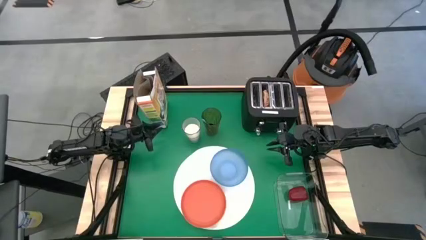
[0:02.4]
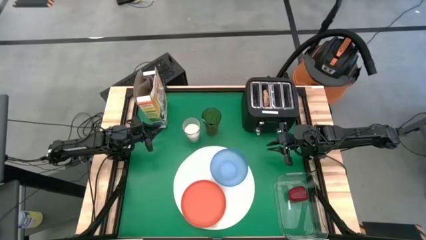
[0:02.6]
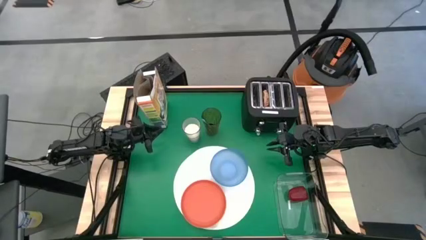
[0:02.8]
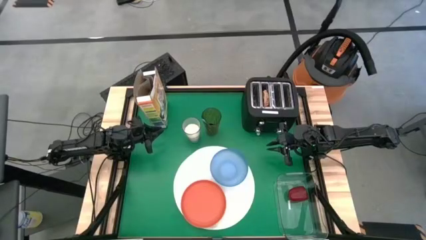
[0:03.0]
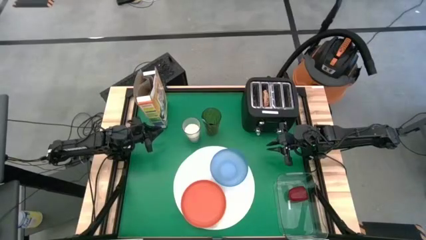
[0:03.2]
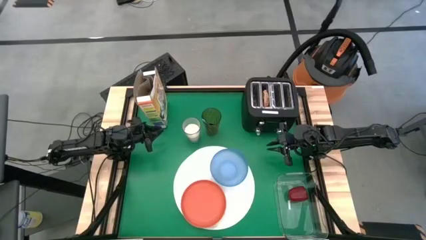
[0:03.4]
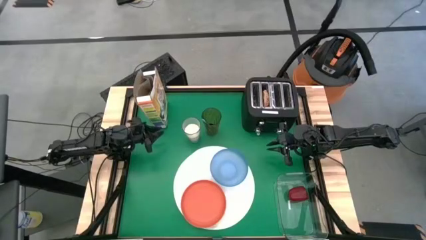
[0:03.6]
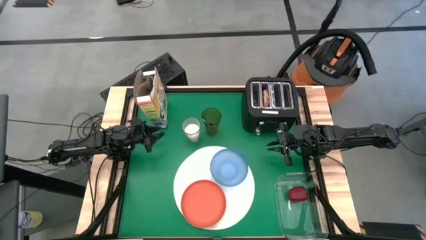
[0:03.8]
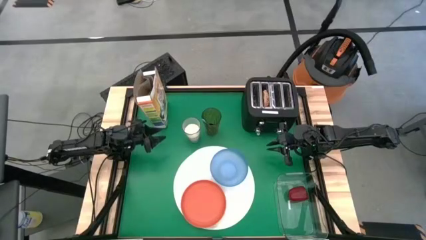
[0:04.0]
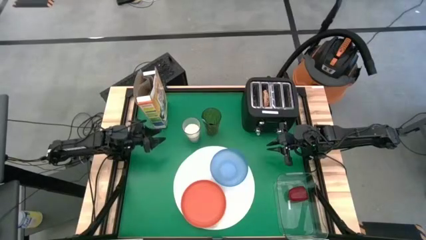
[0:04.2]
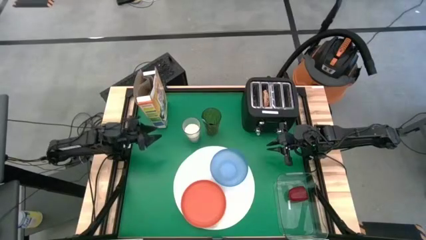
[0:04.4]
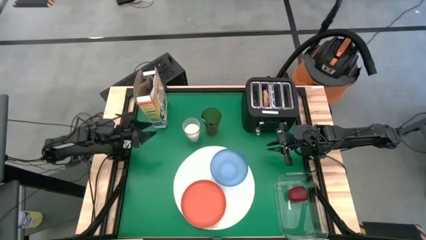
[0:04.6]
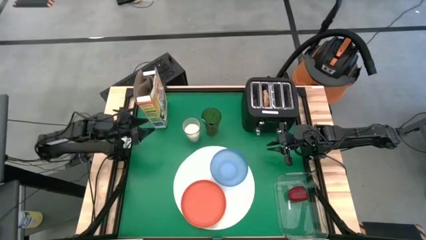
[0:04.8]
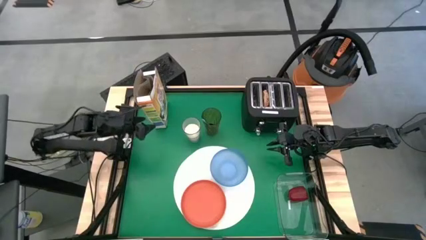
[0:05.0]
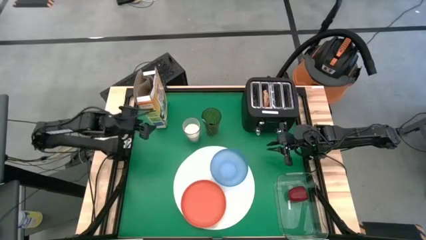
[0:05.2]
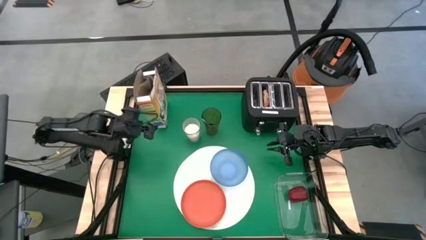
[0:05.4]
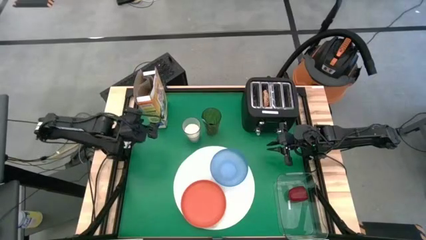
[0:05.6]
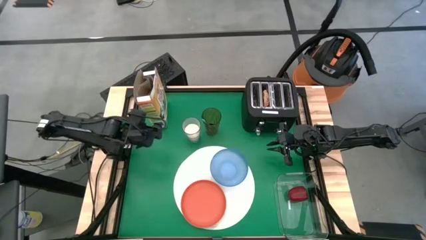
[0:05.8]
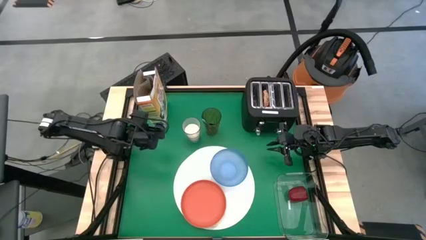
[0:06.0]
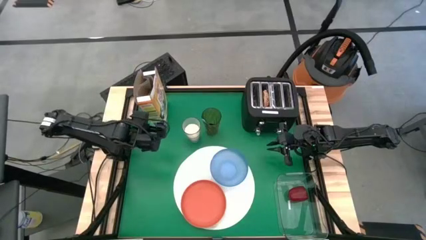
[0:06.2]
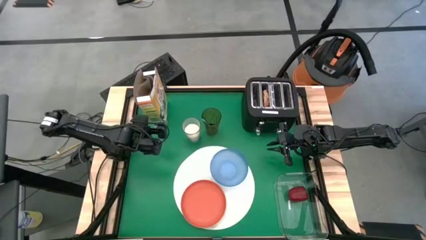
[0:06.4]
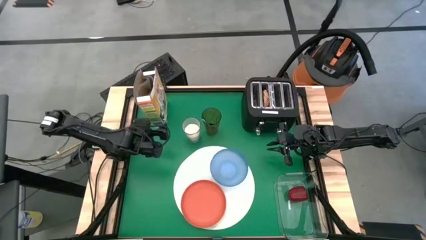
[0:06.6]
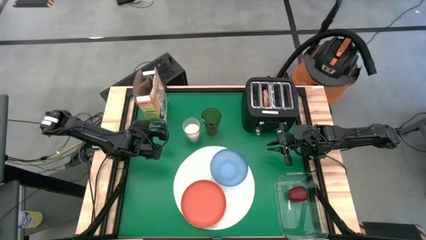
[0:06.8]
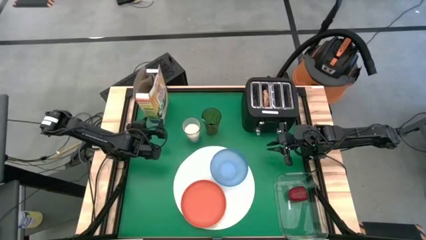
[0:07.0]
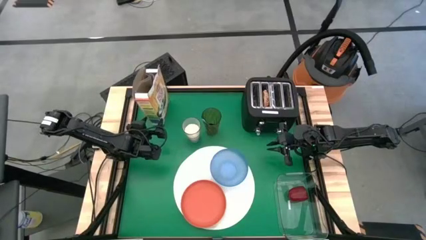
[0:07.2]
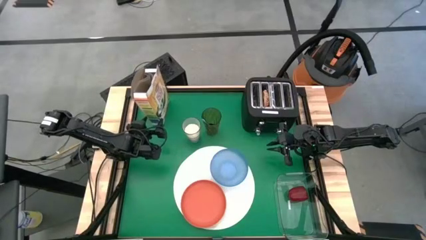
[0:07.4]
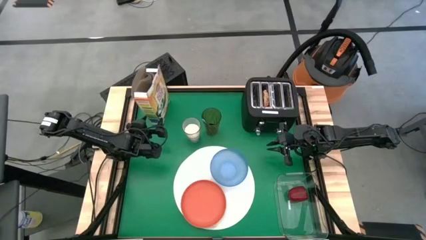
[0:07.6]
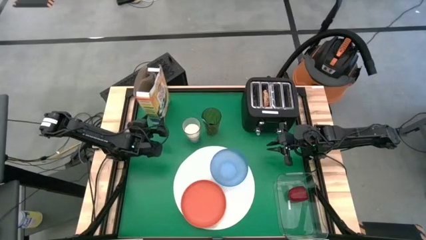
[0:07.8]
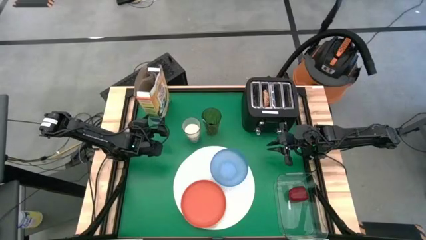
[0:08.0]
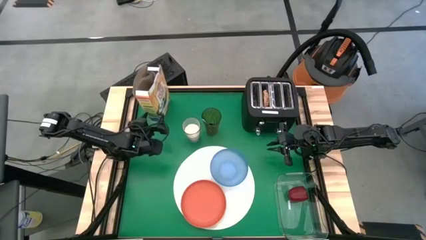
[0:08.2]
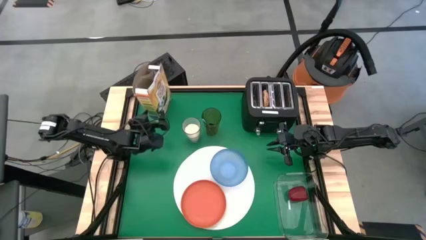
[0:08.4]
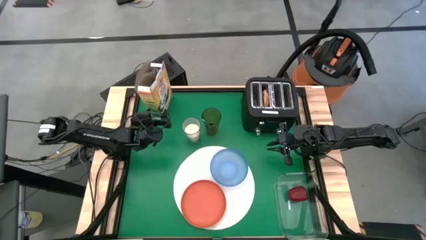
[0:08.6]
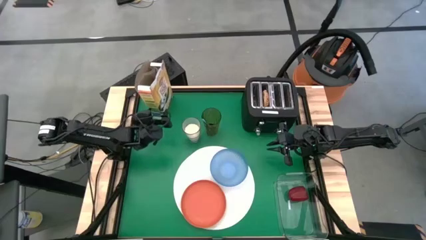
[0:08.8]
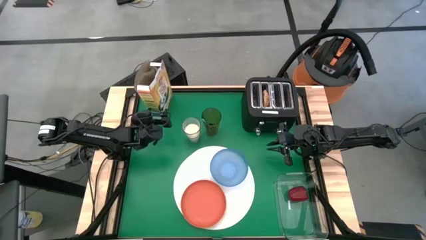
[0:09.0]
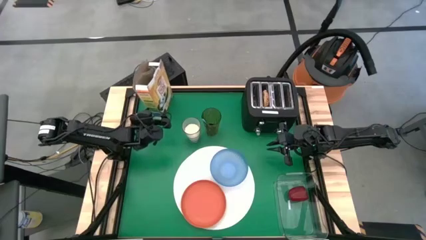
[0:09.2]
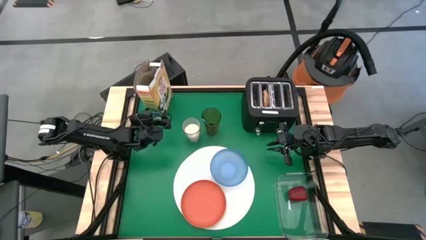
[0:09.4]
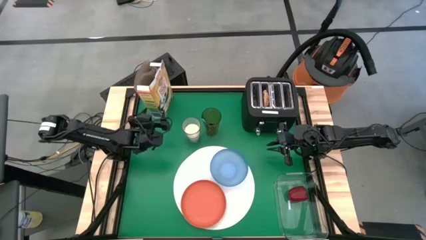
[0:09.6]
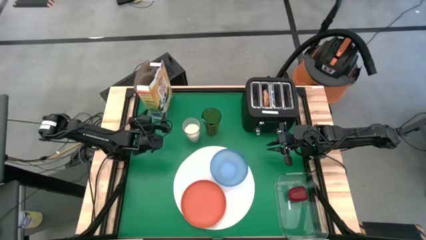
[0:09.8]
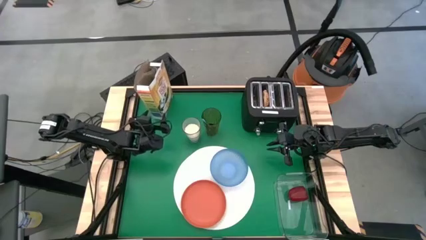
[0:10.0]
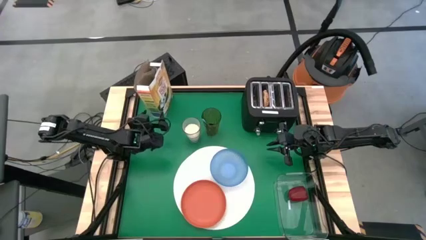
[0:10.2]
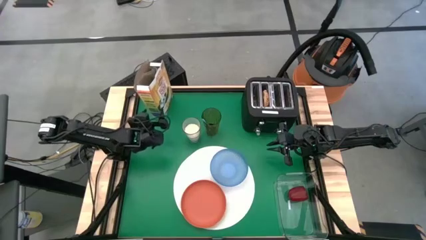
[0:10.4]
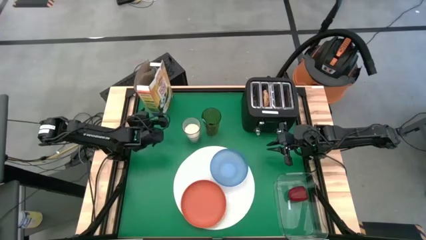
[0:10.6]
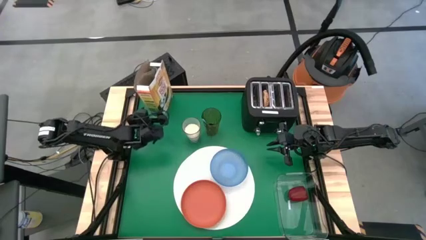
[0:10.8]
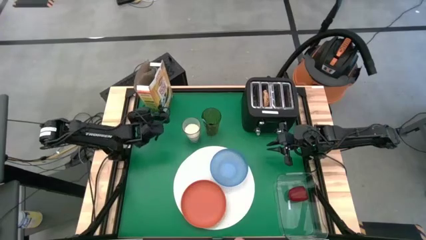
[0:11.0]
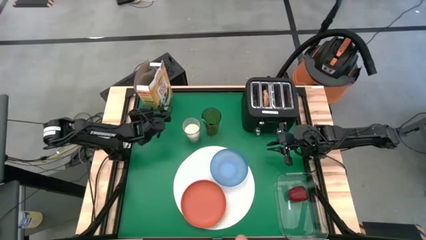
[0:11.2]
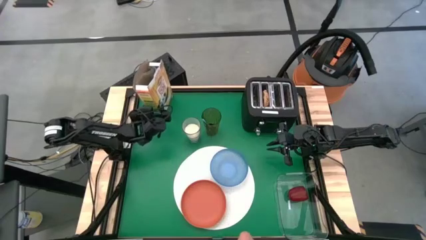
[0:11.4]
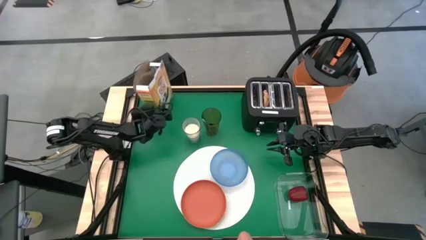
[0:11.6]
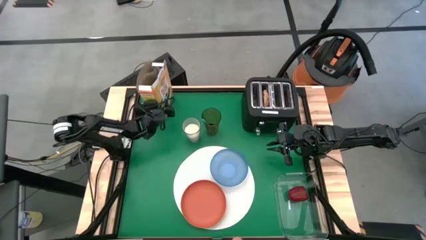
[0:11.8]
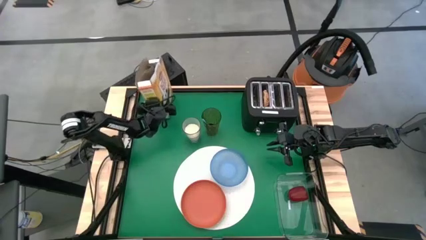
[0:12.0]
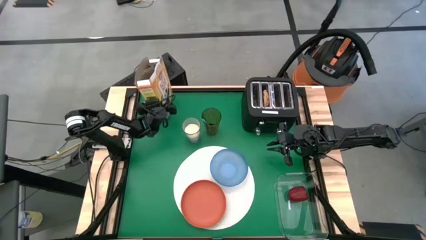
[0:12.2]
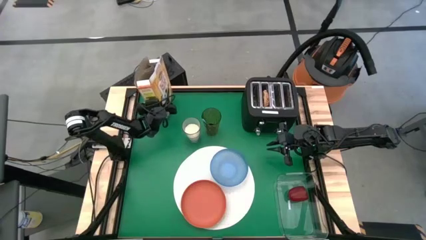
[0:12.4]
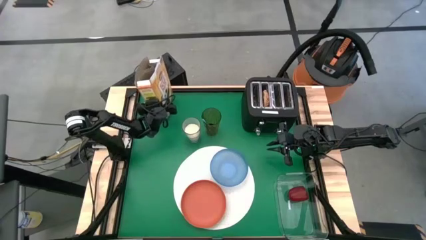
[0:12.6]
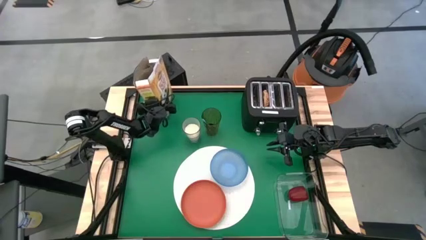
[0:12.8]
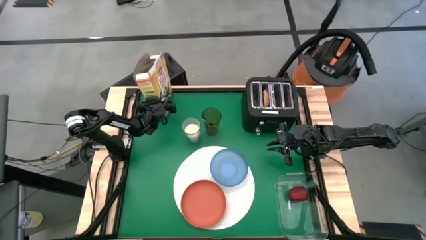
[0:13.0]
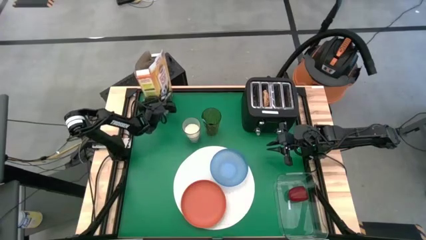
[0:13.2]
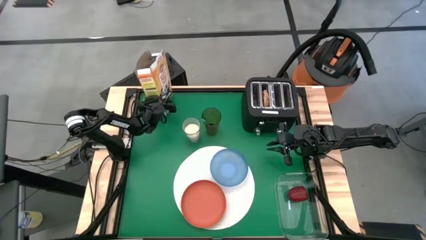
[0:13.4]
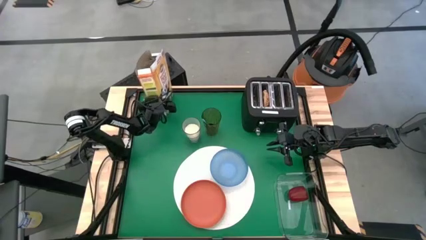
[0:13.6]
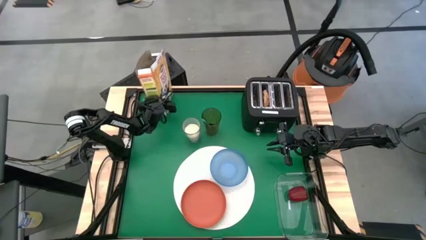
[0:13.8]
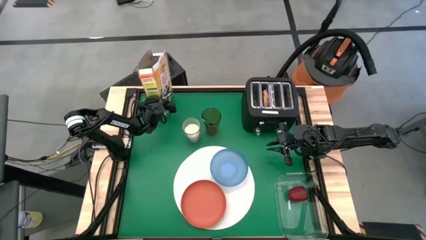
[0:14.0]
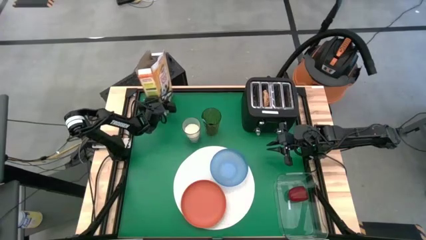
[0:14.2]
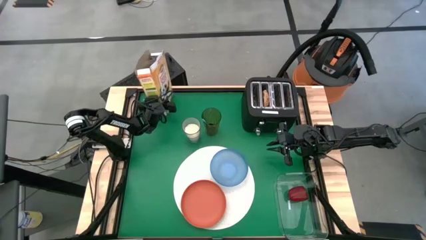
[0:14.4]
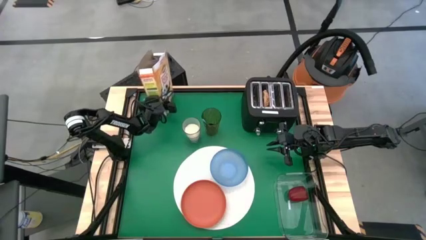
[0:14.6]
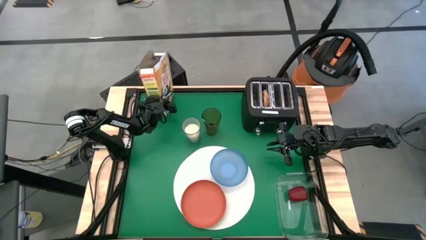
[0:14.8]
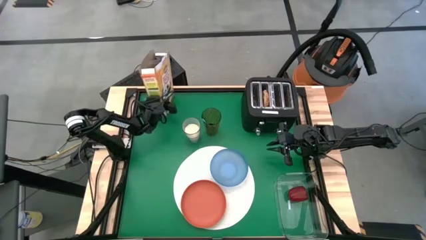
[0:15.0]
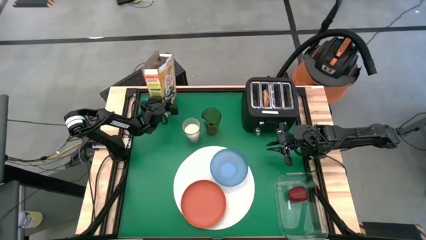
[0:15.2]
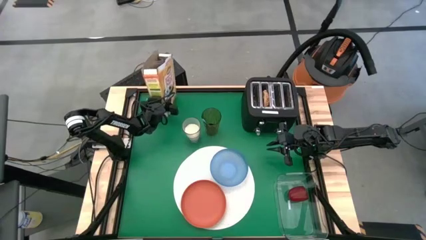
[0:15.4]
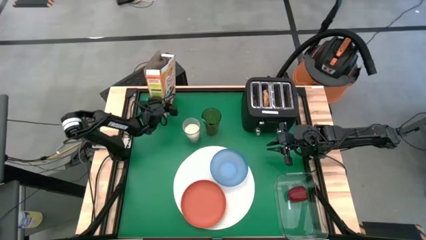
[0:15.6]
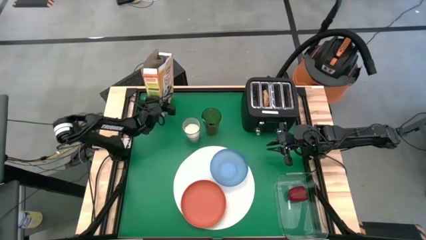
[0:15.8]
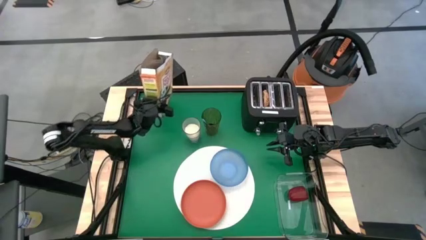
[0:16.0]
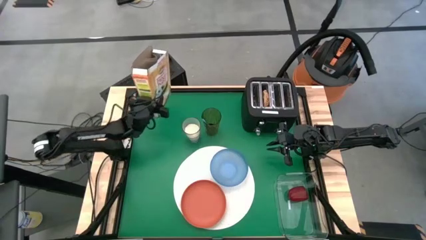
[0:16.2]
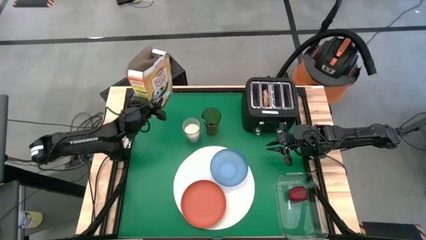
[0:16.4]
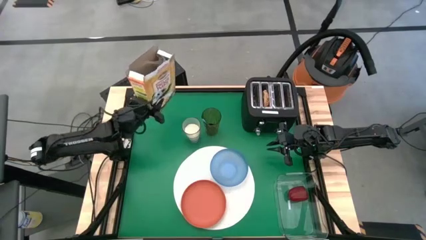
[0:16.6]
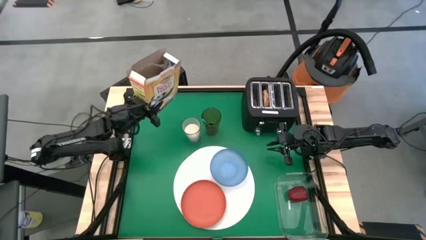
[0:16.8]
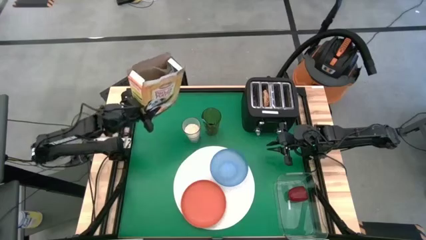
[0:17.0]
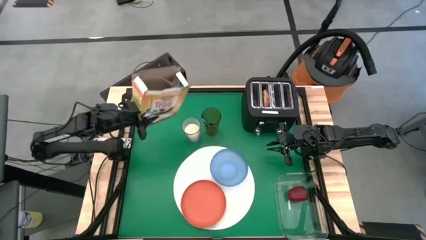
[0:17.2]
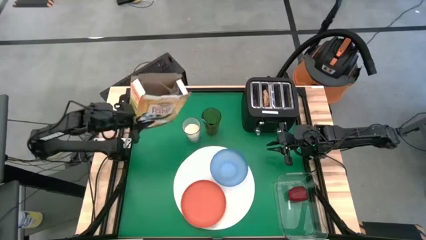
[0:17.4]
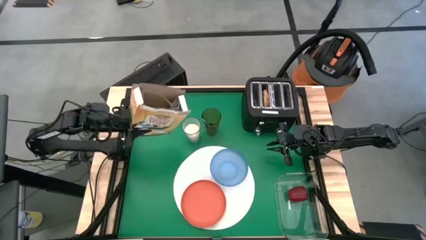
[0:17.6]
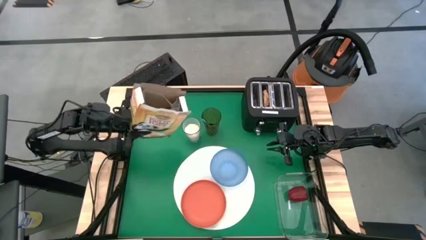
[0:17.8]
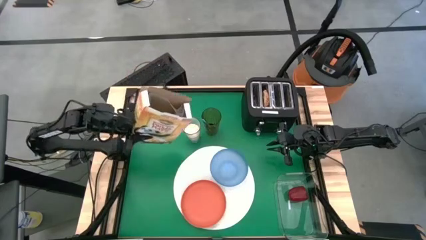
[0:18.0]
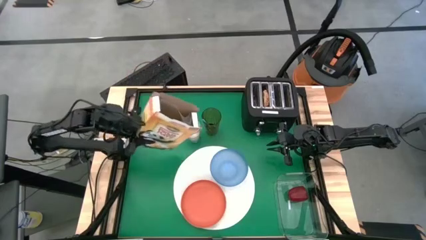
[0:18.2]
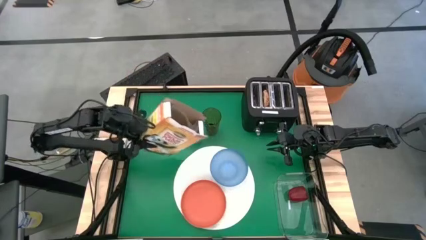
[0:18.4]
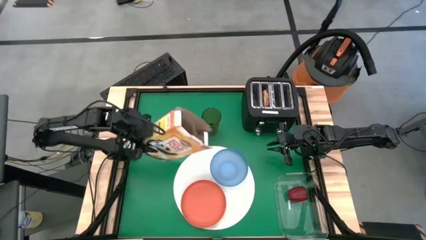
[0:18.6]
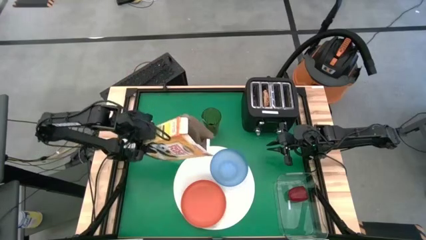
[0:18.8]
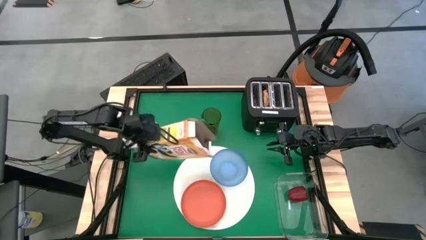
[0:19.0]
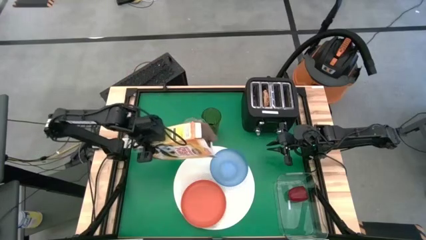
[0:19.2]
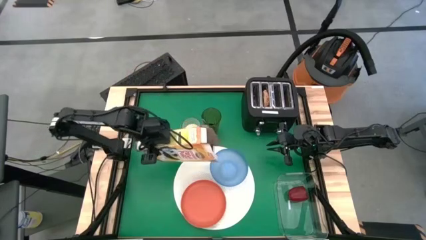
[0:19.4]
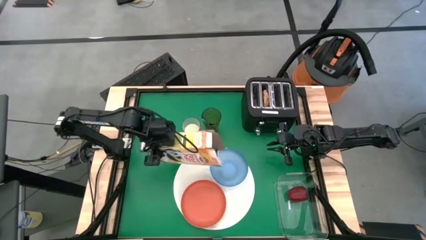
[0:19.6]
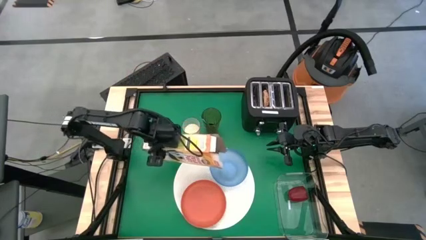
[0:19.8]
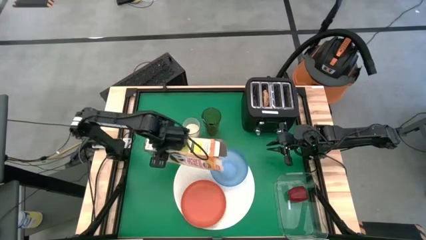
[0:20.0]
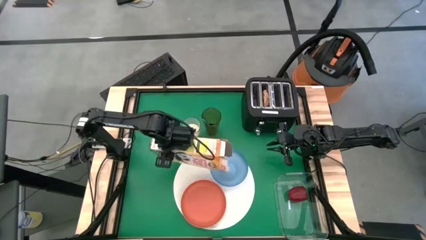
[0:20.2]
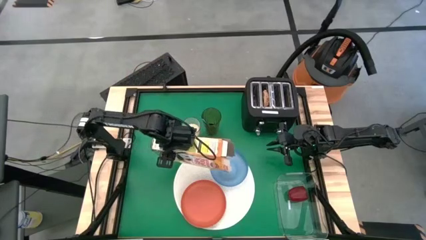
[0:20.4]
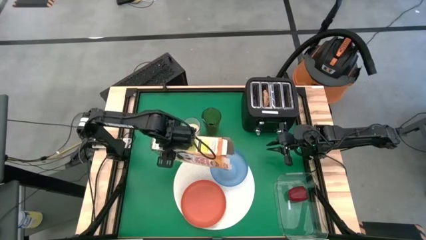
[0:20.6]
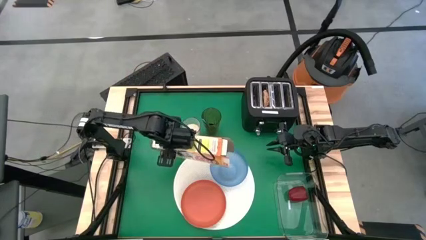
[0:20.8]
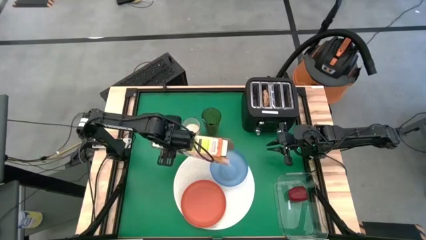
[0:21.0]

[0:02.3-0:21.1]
Task: Arrange a breakfast setting
Pour the cereal from the cereal box on the blue bowl
